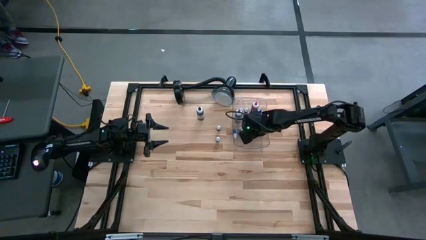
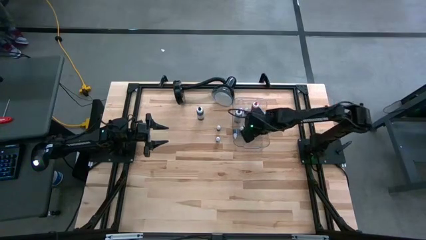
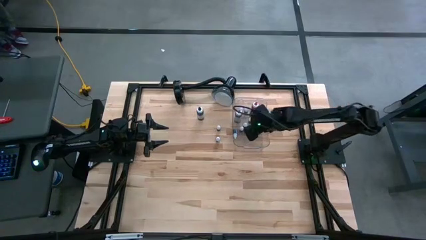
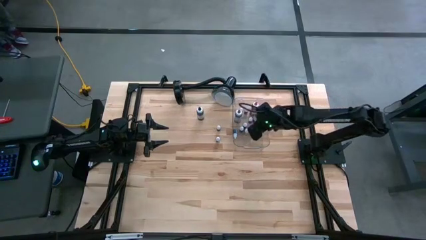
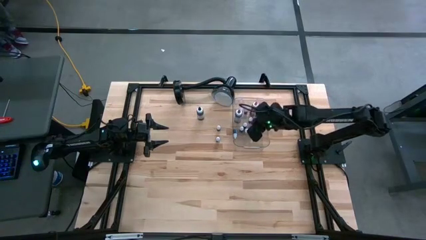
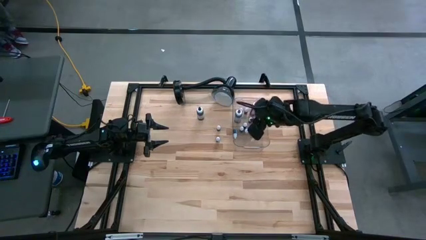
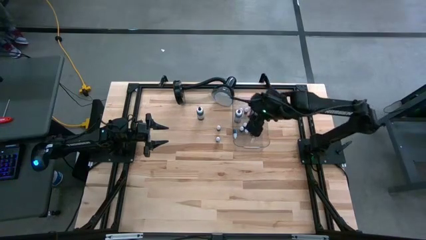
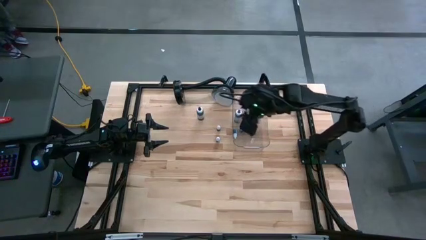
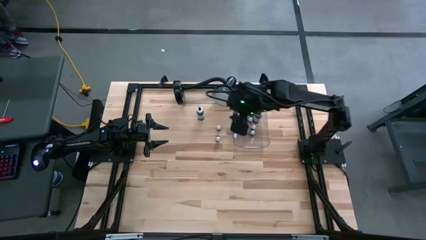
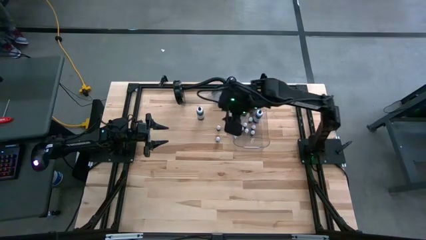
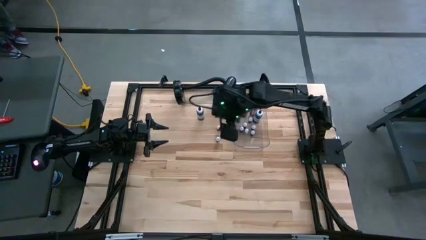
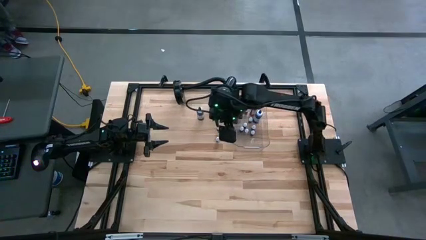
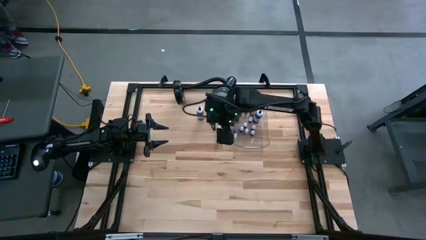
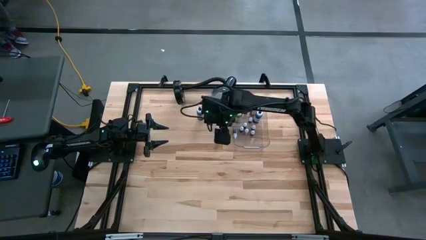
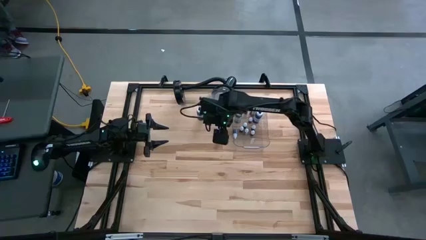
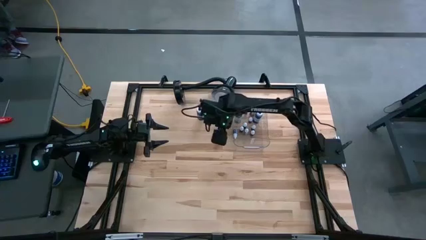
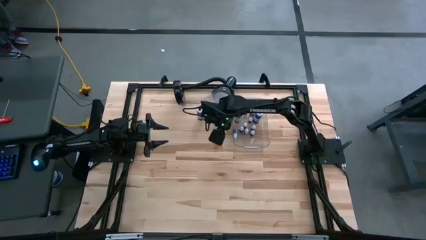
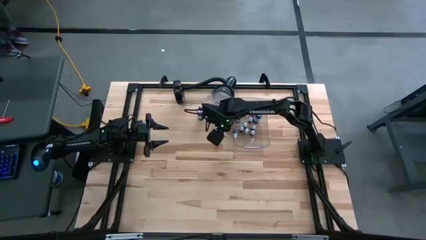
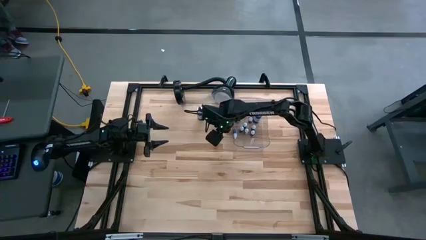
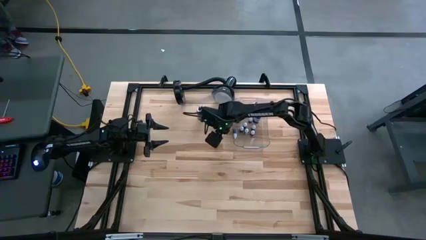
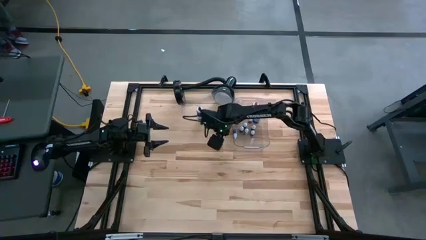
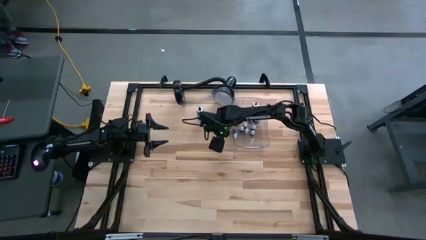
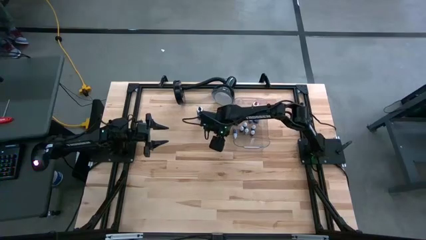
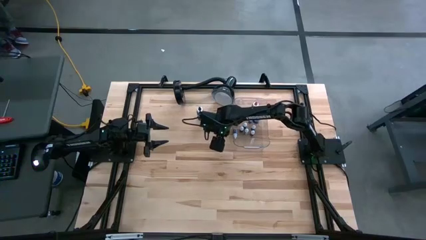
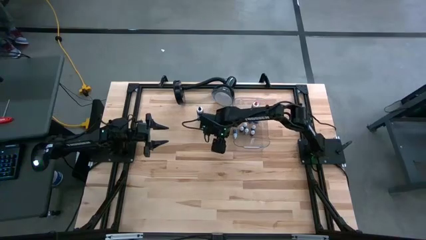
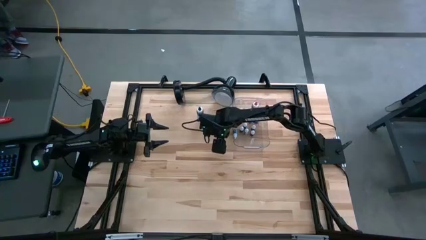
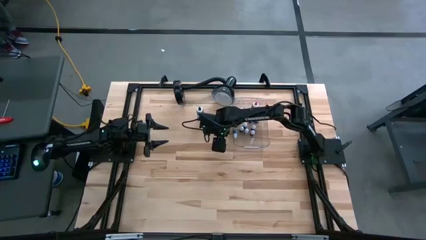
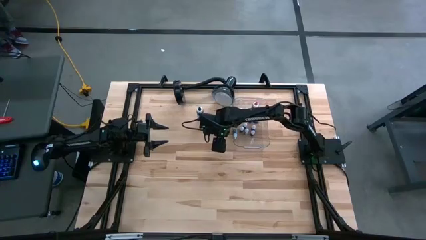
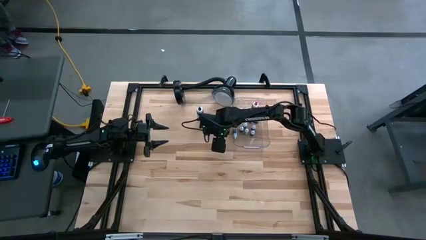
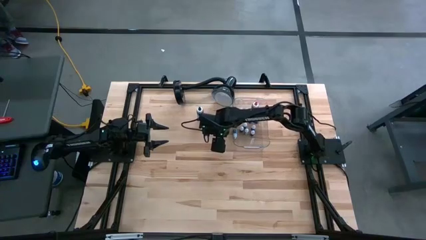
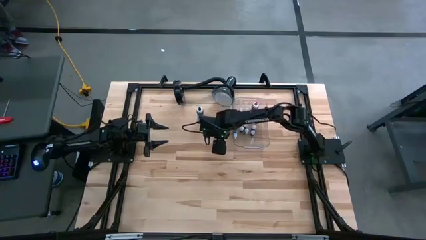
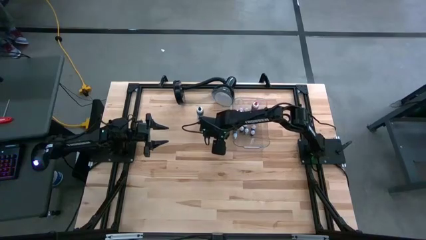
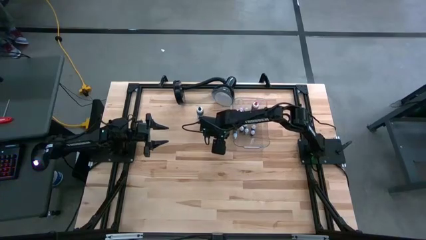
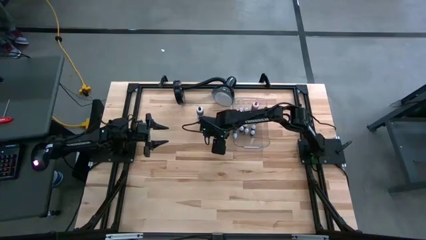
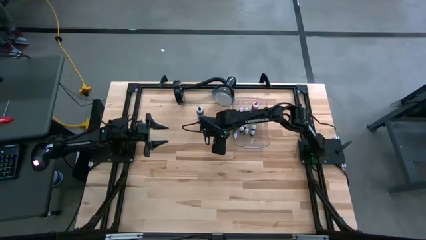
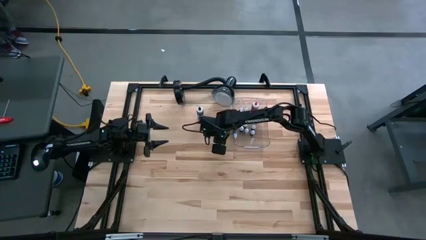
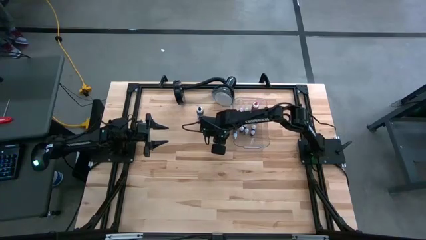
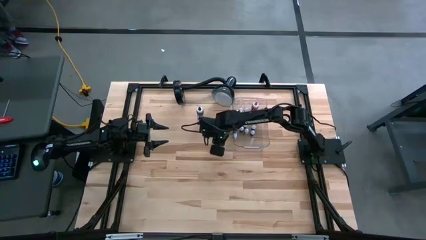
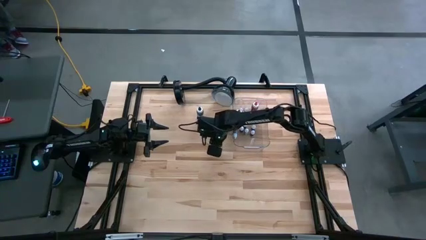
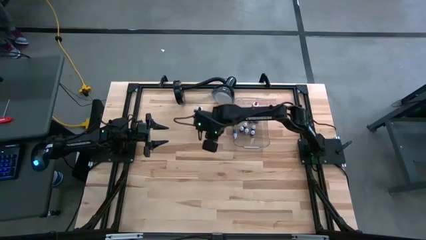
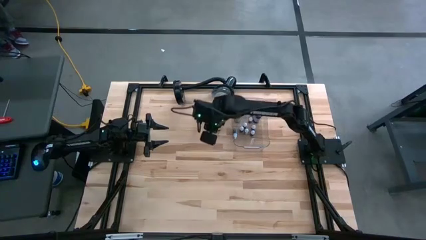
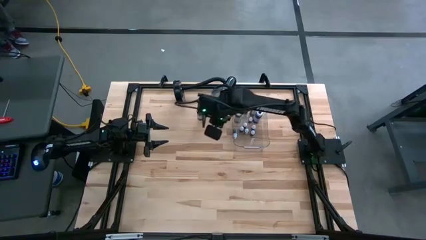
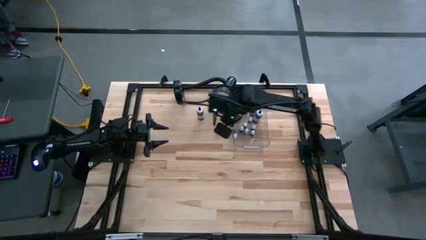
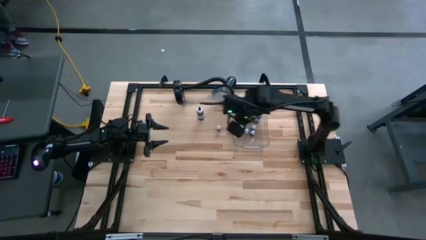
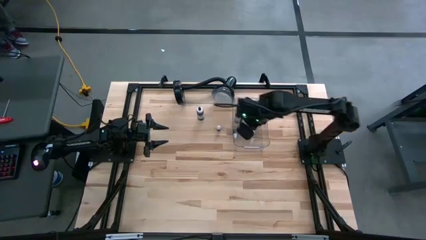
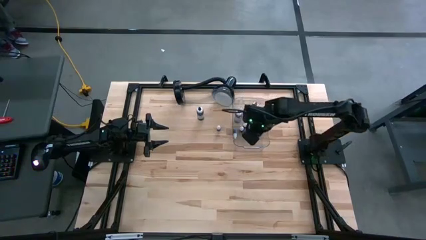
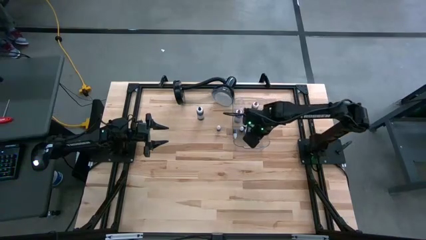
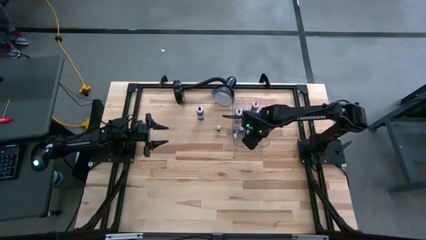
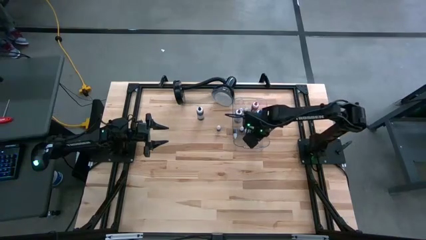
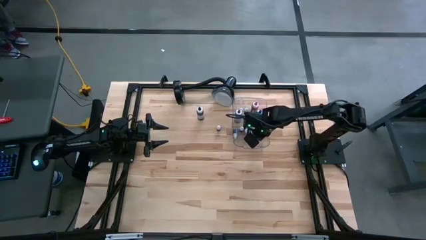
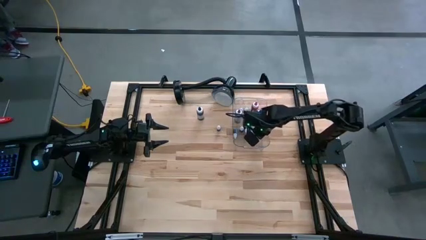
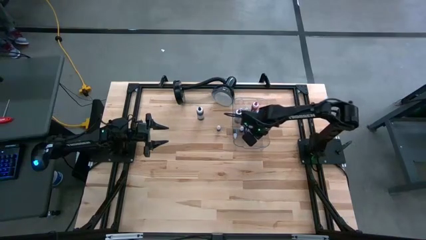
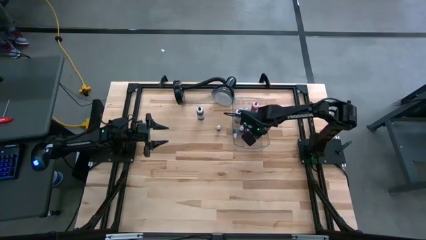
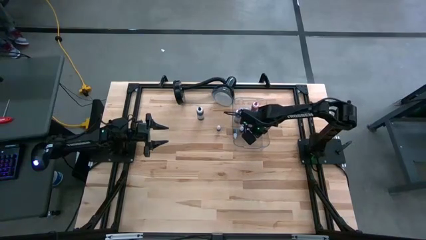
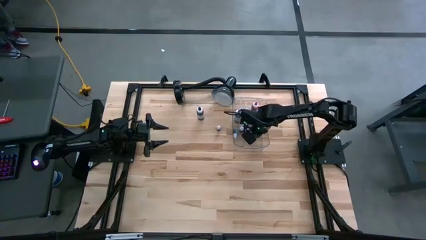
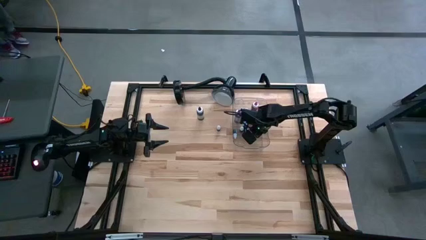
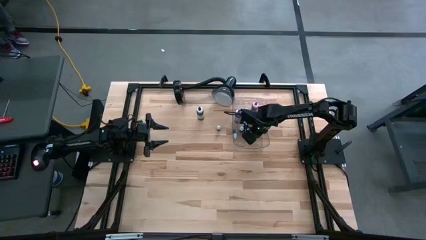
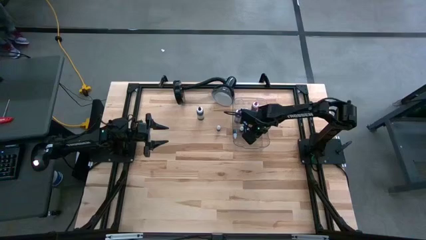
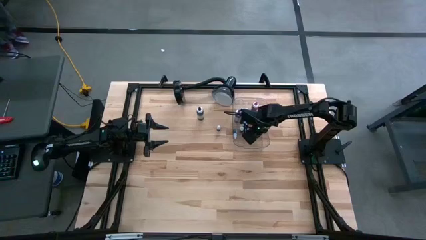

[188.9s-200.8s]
Task: Pick & Place food coloring
Put the small black food coloring bottle into the transparent bin

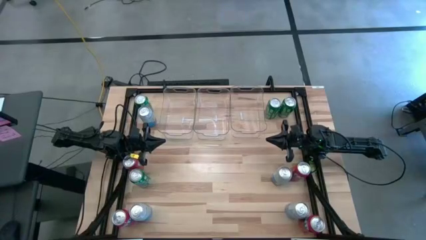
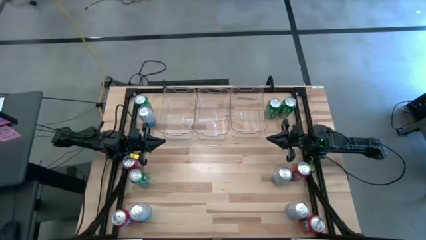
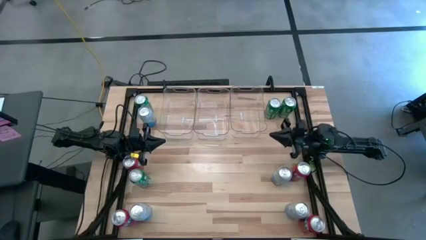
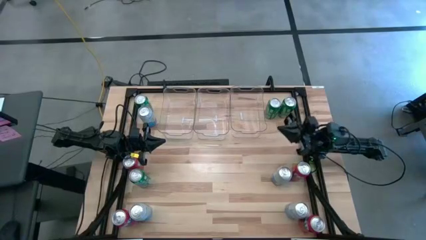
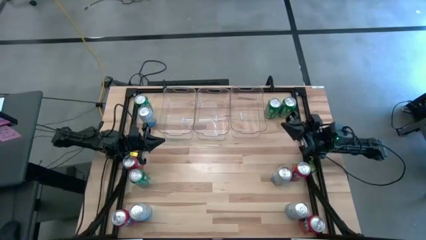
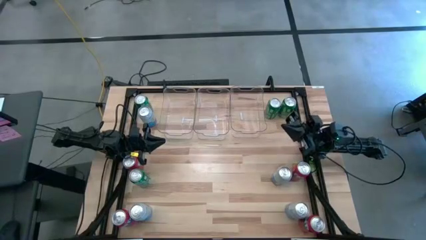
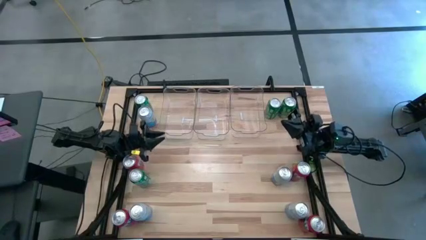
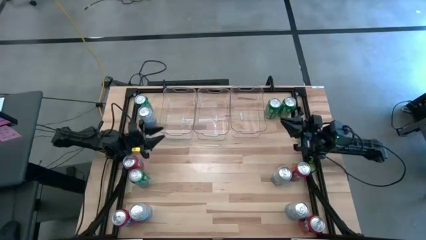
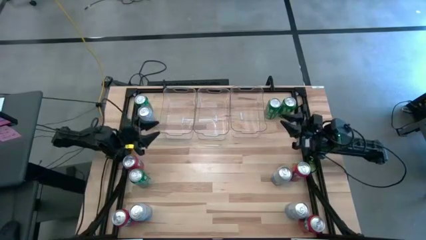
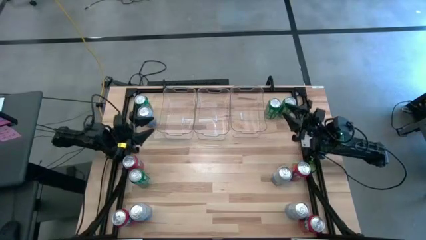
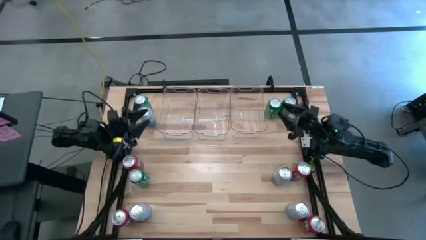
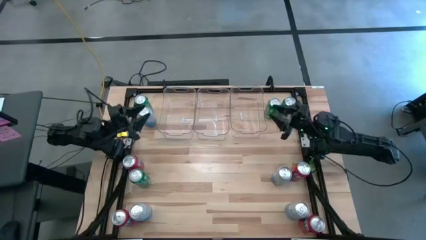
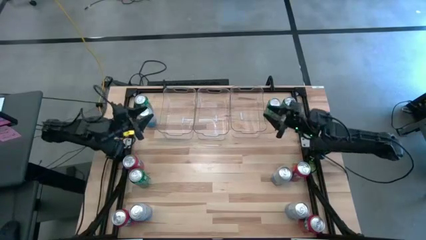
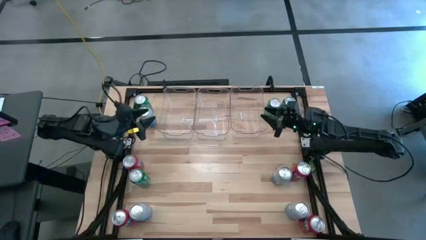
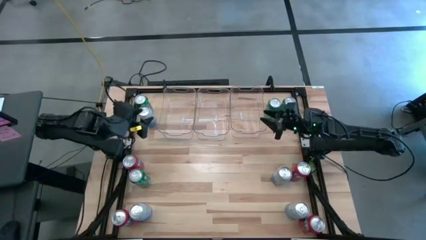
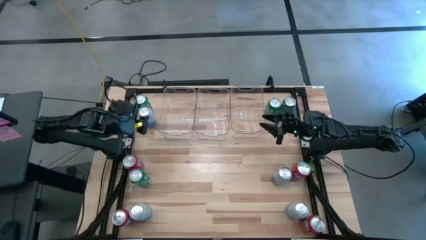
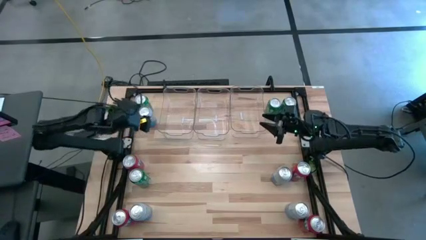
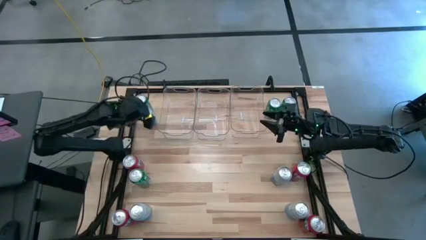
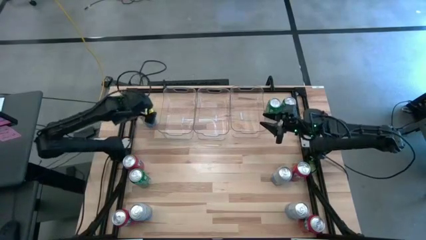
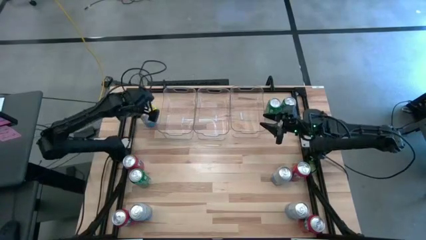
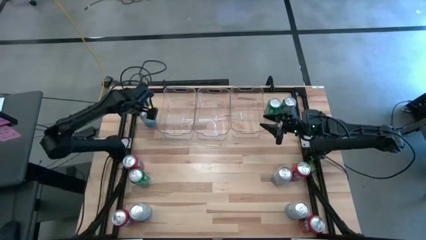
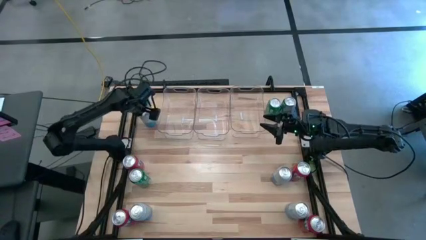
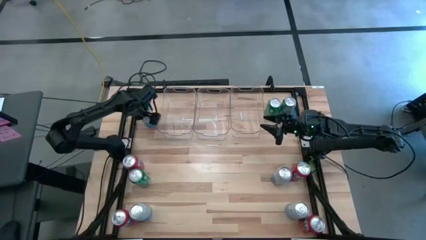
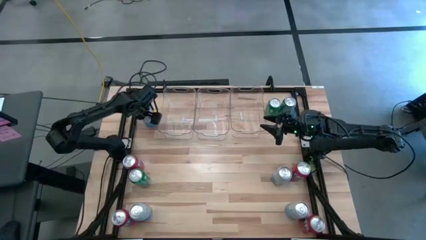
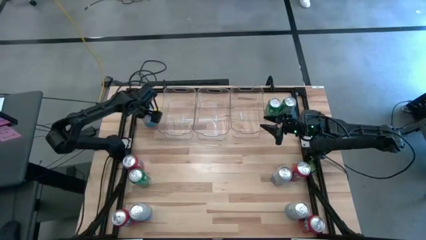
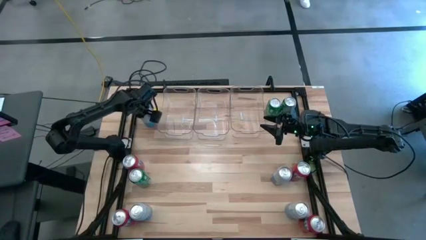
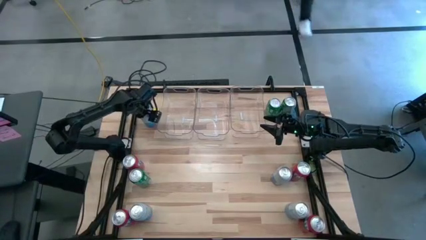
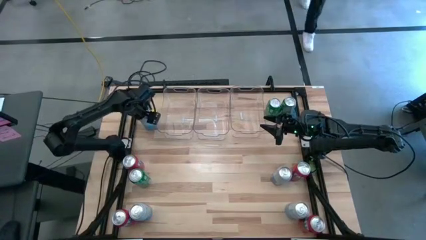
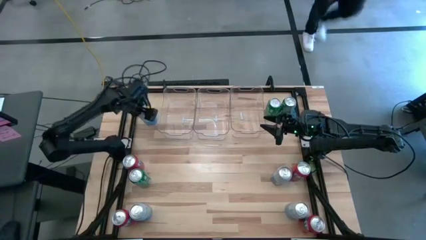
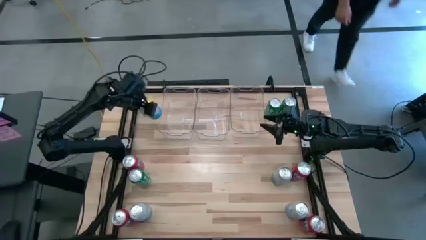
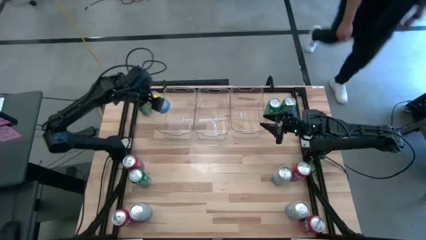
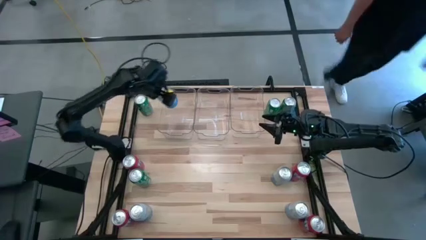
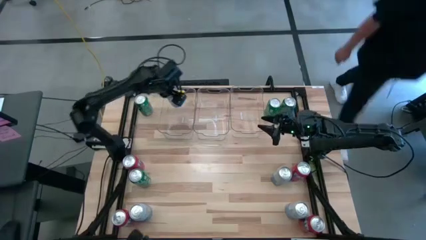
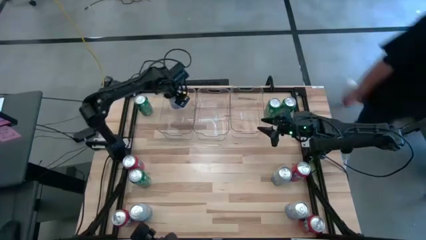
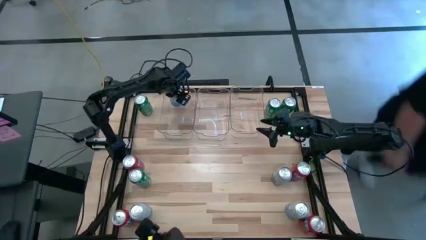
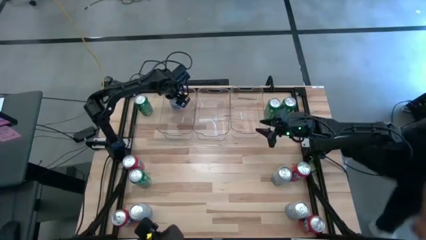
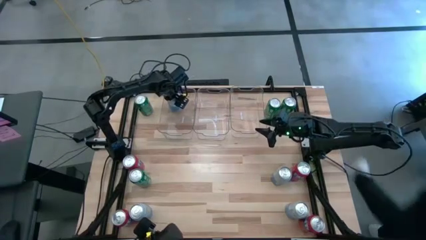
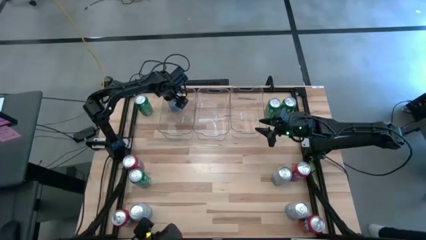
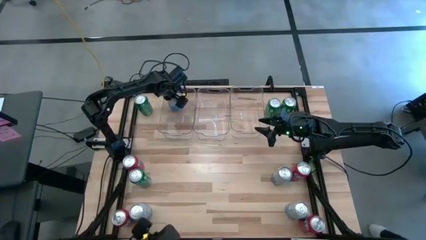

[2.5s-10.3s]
Task: Sort soda cans
Put the blue-white soda can into the left transparent bin
